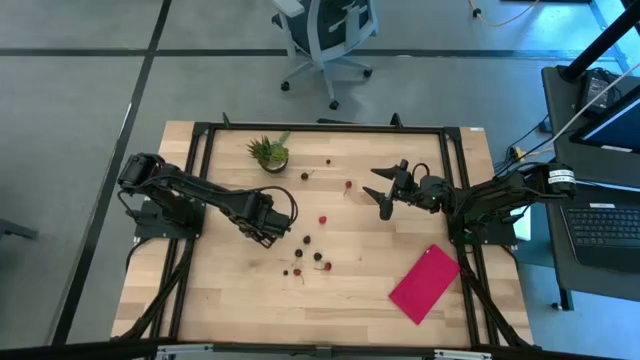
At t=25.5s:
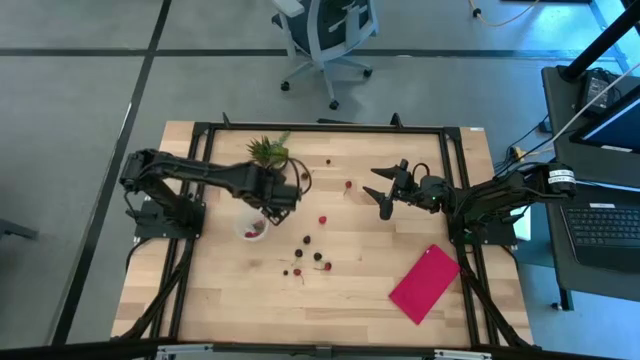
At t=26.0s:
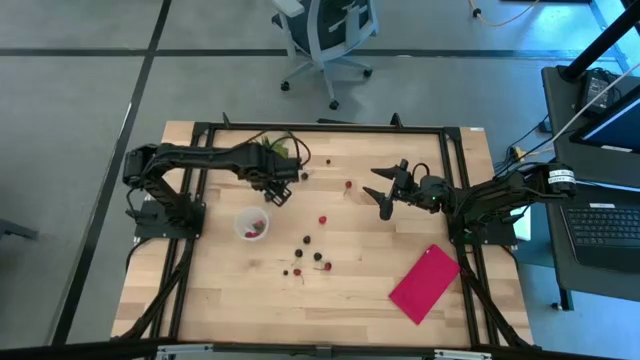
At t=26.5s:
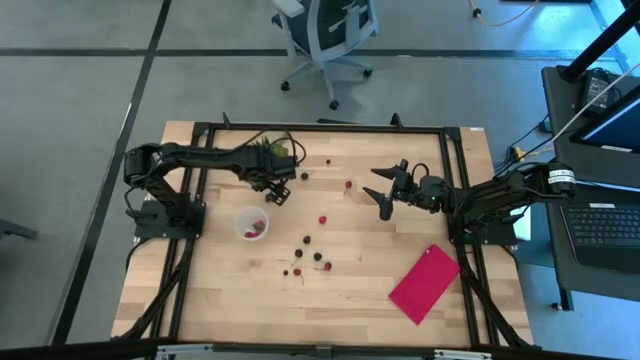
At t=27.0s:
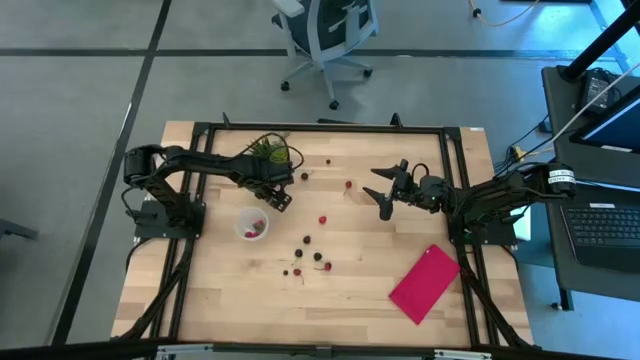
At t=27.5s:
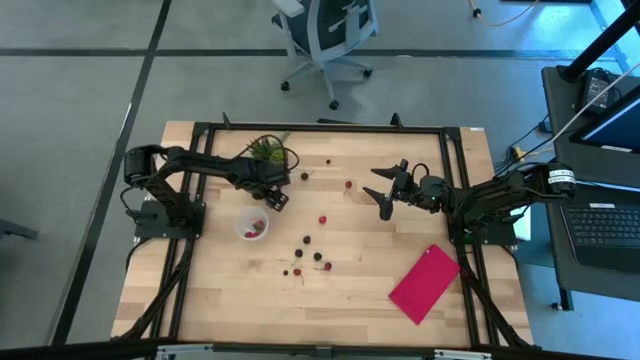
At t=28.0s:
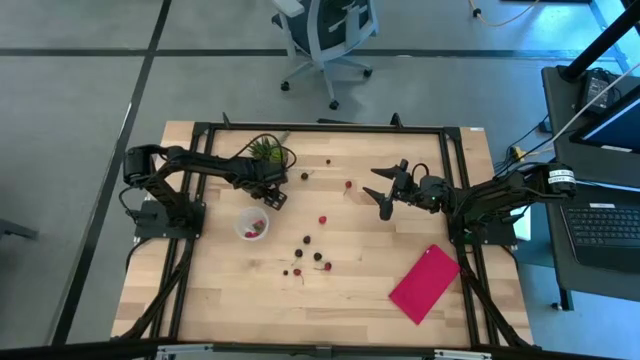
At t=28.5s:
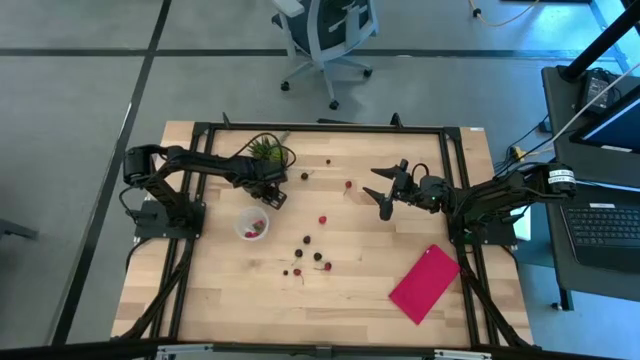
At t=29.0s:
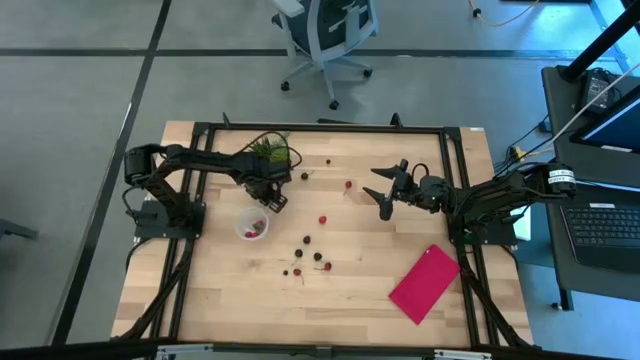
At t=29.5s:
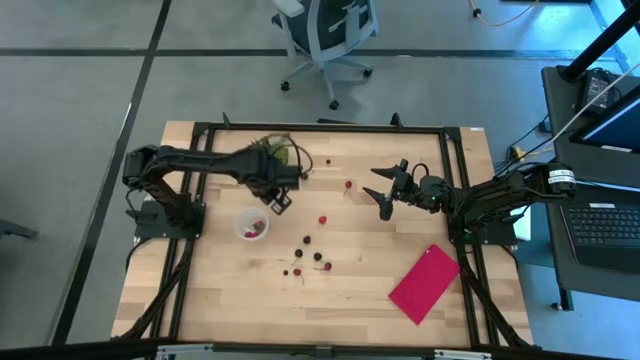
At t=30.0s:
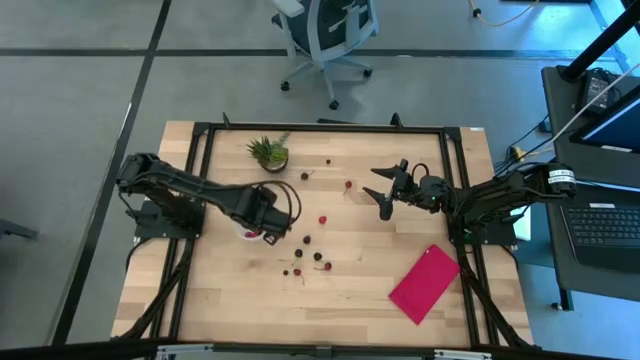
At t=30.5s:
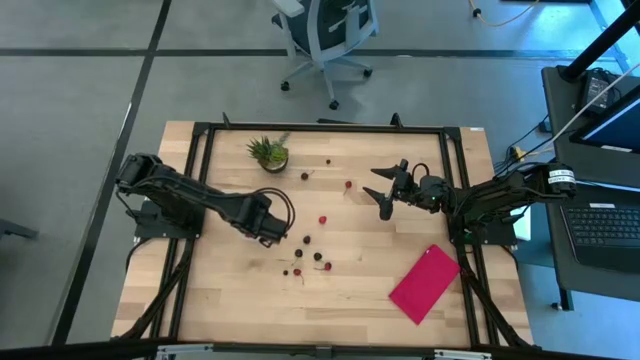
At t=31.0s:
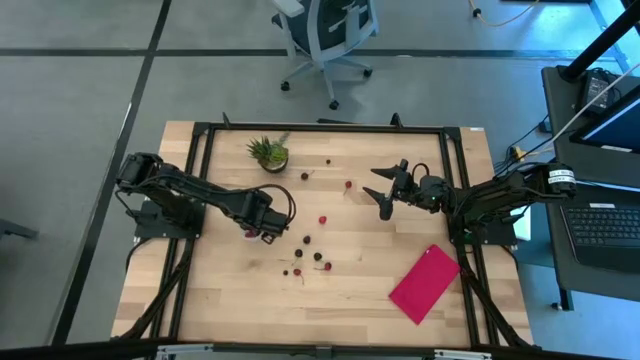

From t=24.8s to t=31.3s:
Task: Pick and placing Produce into tupperware
Put the blackberry into the transparent container

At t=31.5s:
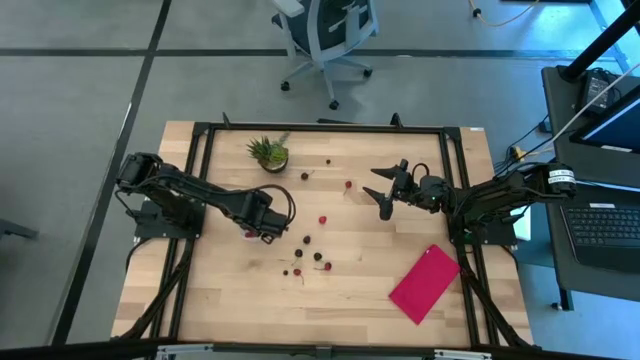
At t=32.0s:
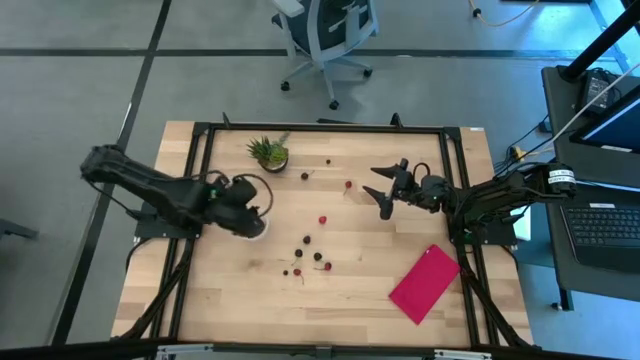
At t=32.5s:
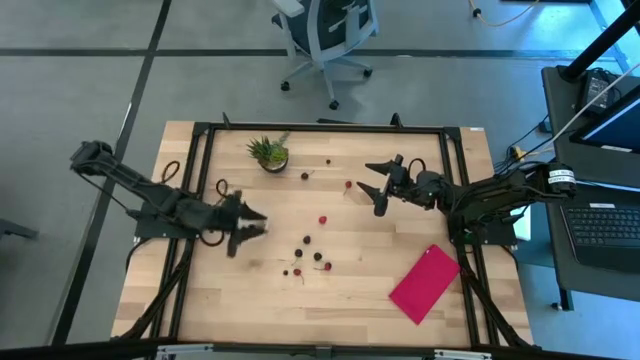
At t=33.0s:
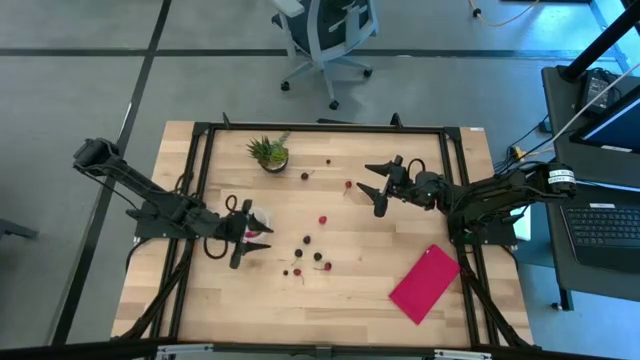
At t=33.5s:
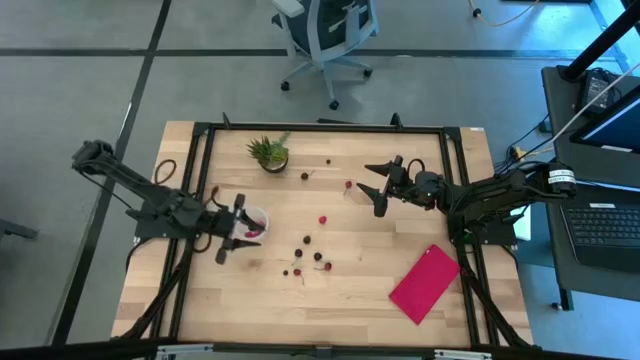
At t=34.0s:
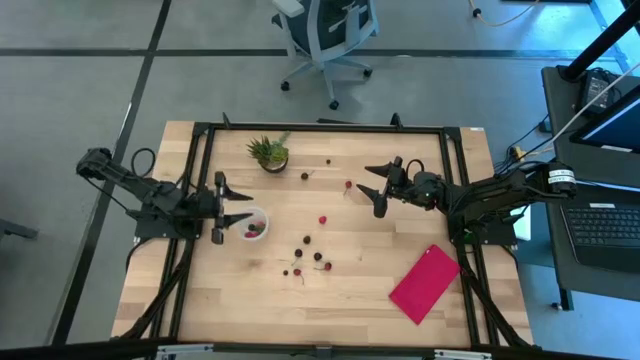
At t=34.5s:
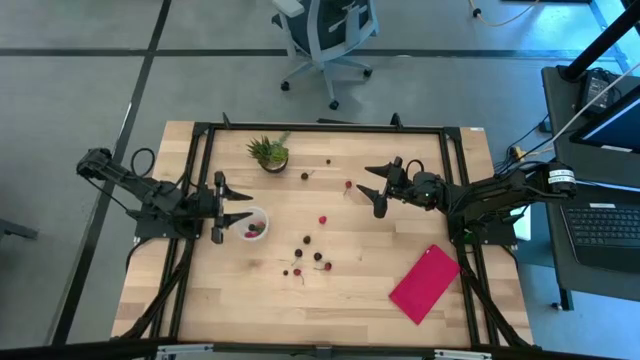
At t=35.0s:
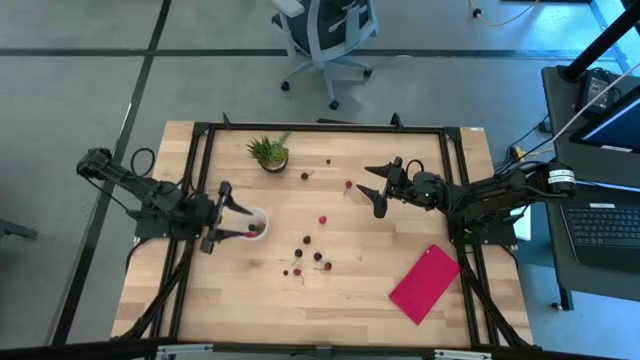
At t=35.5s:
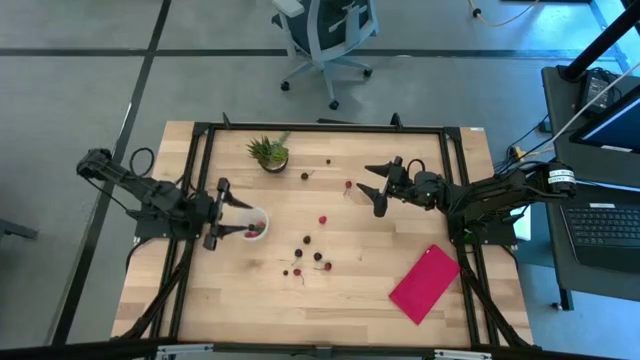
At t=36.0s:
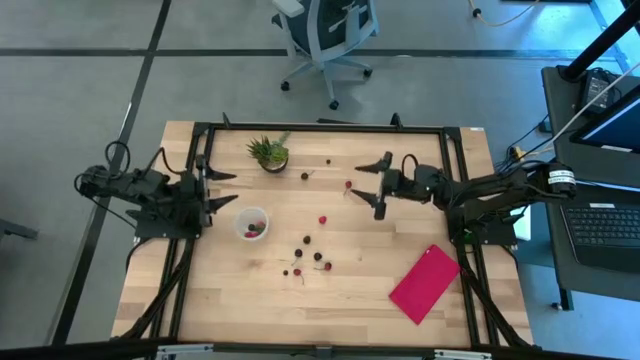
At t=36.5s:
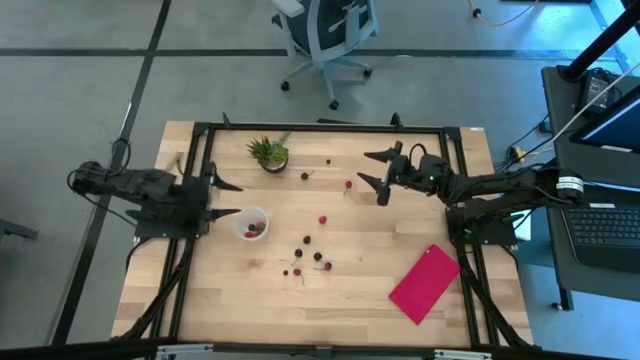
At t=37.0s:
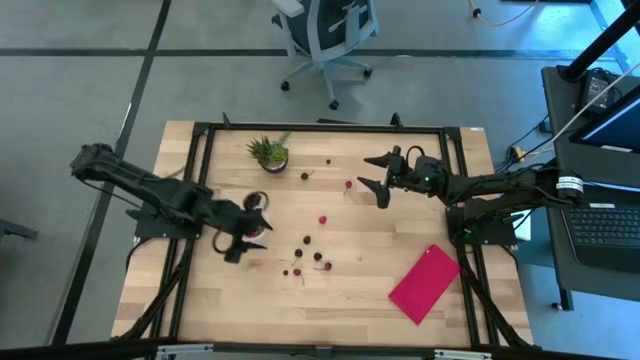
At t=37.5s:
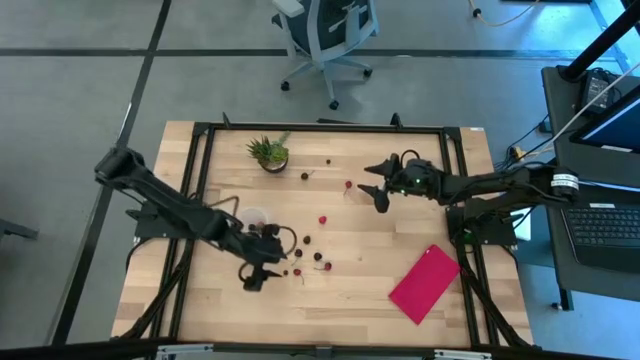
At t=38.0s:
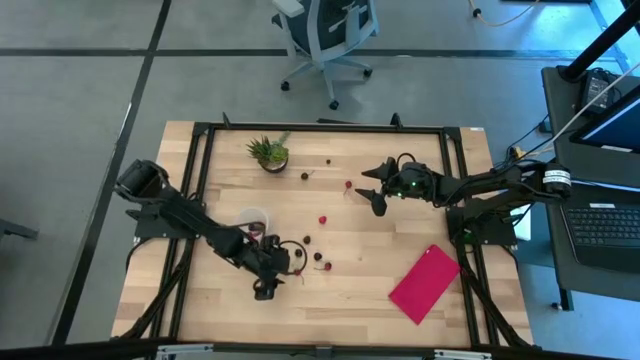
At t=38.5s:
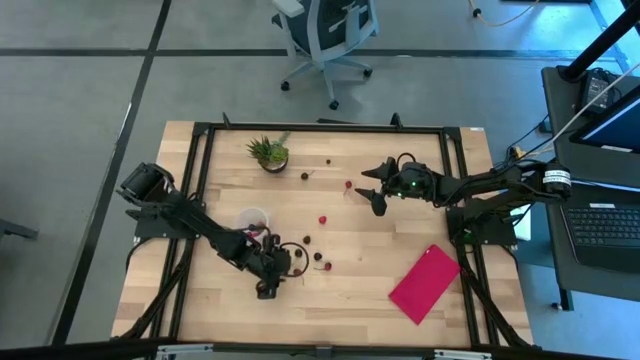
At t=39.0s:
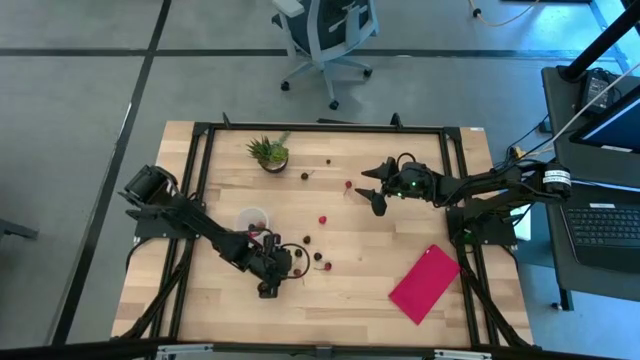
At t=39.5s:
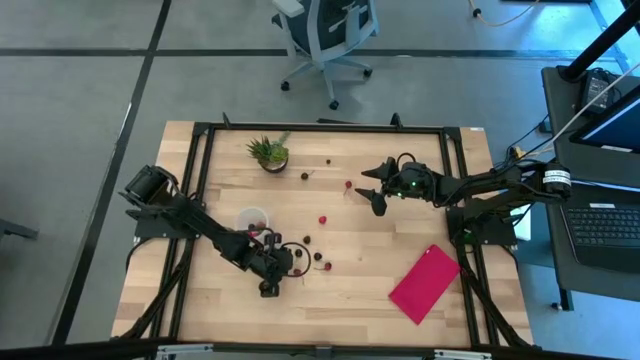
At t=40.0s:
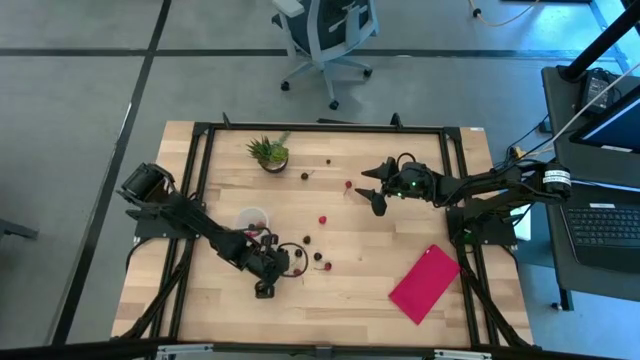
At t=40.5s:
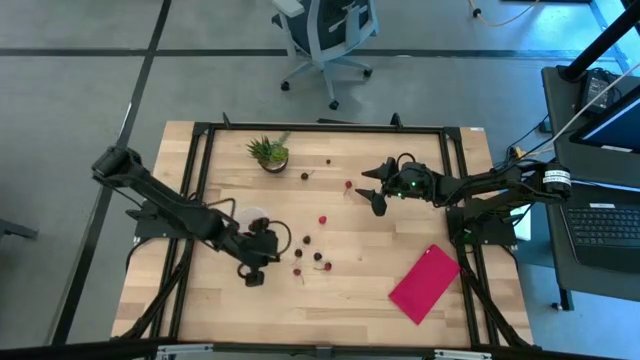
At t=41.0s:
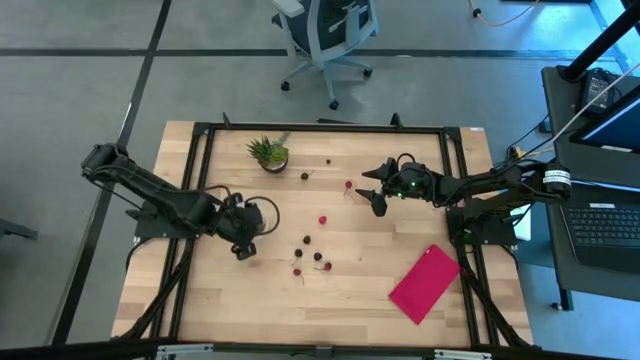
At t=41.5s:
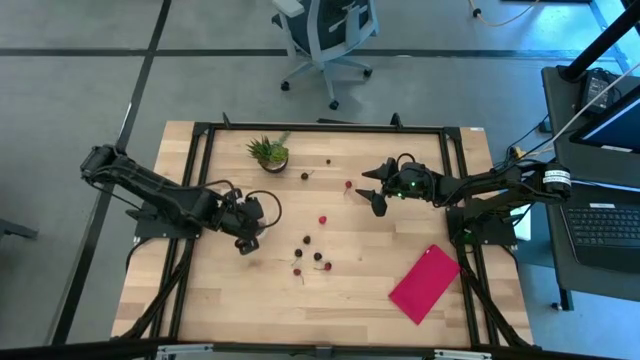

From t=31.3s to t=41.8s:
Put the blueberry into the transparent container

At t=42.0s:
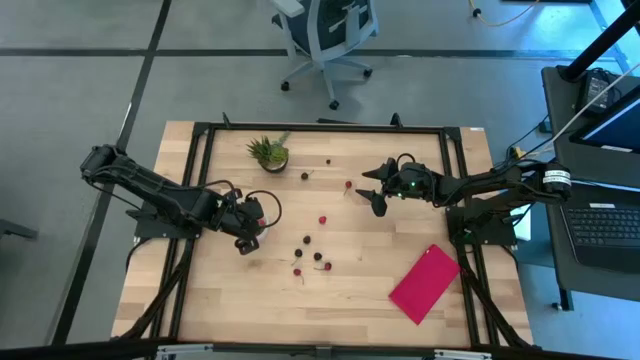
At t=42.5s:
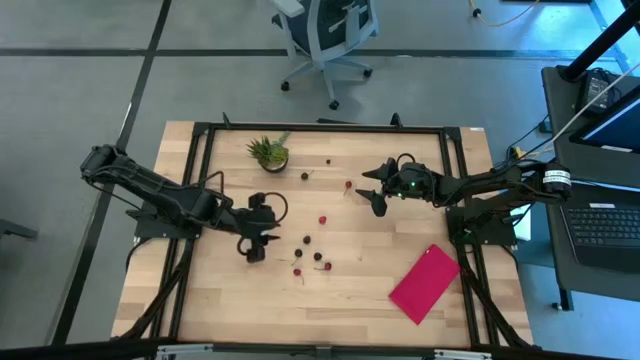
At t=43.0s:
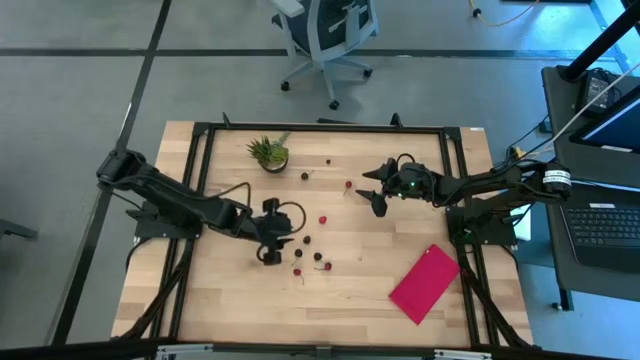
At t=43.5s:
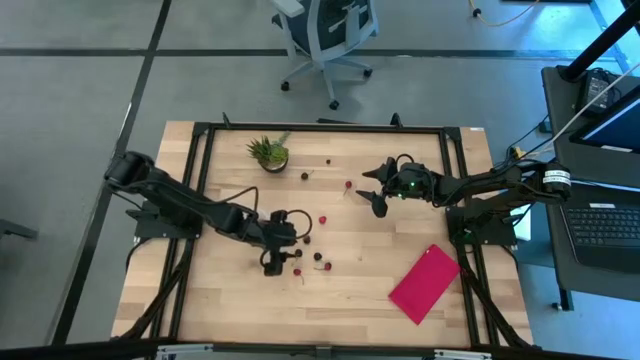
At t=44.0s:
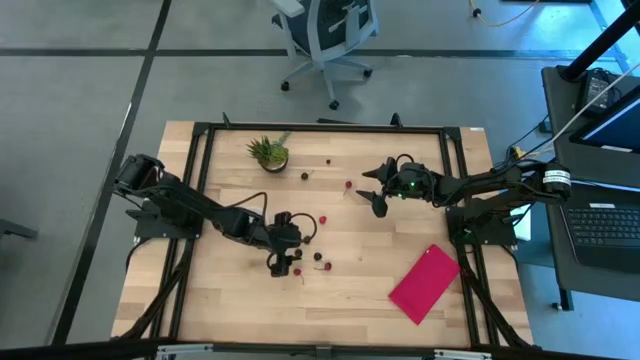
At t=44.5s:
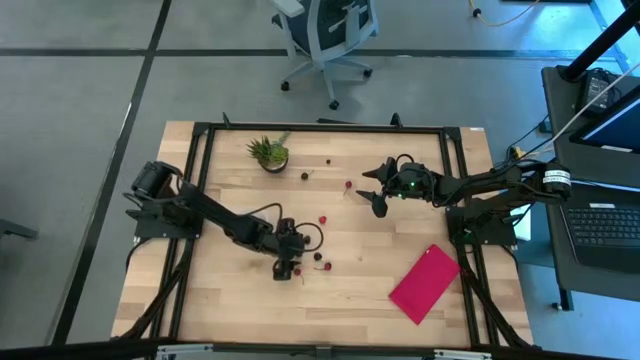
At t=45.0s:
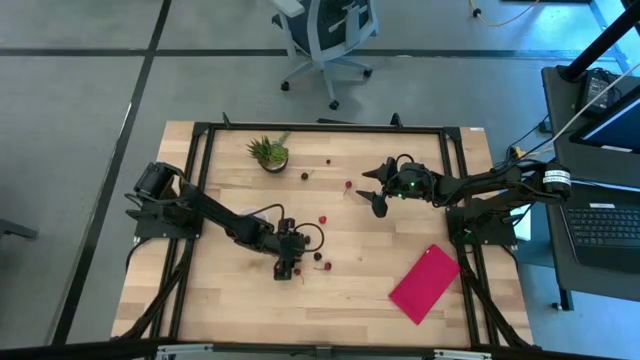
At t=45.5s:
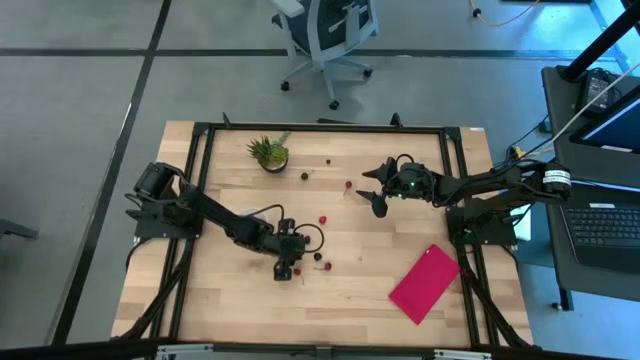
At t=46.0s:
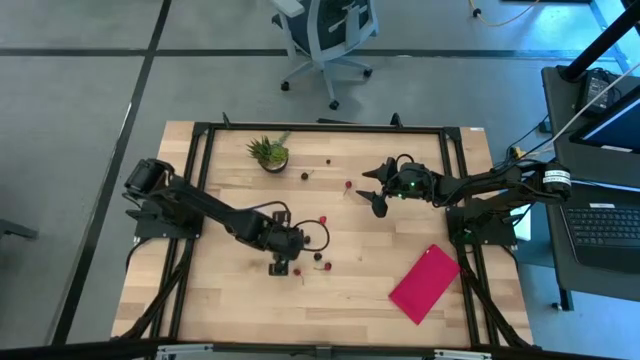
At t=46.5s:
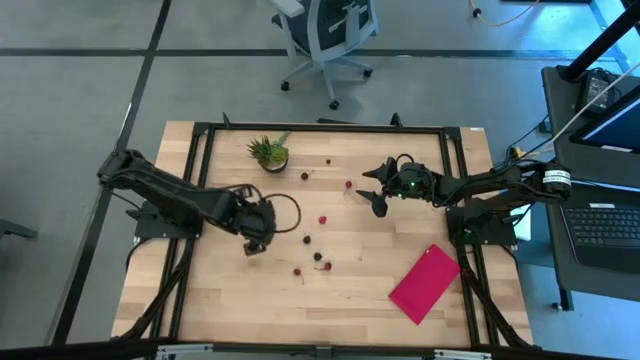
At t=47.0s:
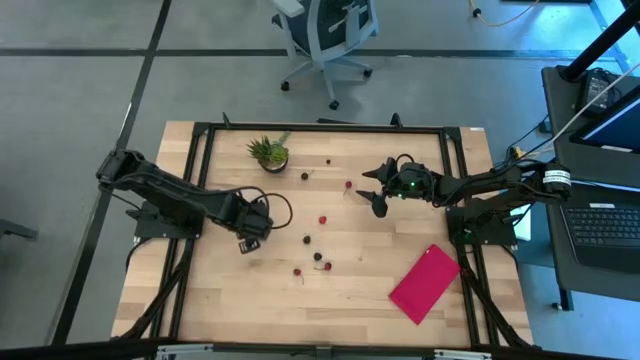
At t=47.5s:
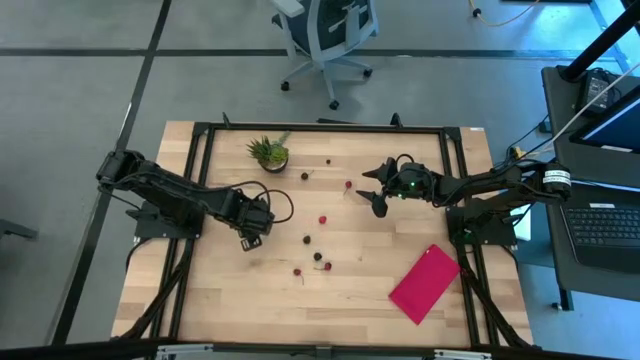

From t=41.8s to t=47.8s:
Put the black cherry into the transparent container
